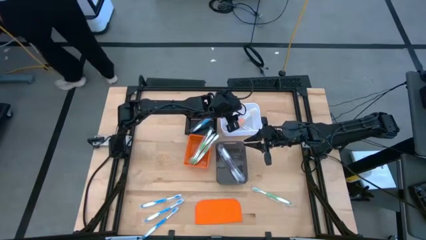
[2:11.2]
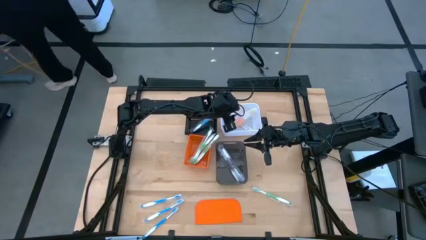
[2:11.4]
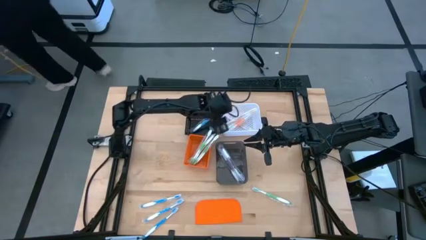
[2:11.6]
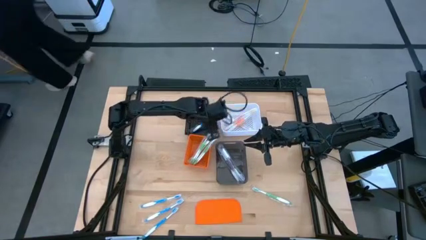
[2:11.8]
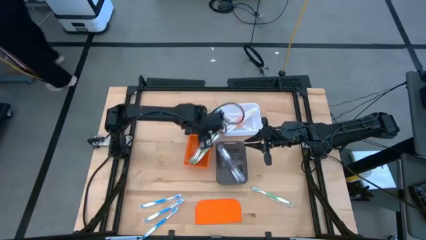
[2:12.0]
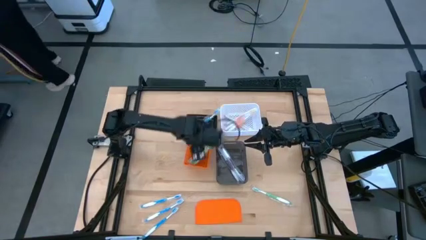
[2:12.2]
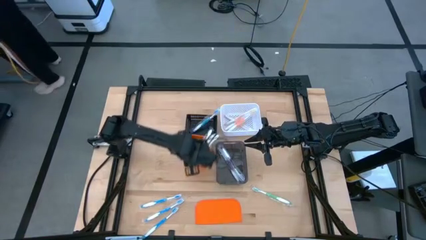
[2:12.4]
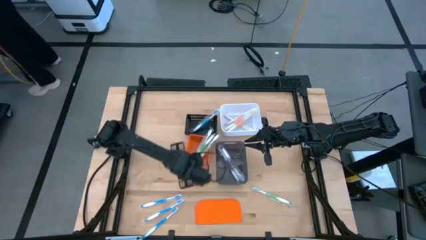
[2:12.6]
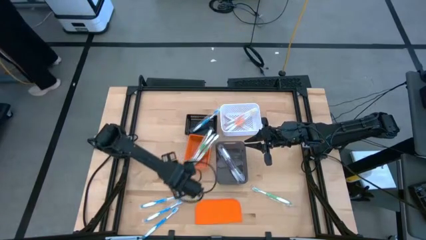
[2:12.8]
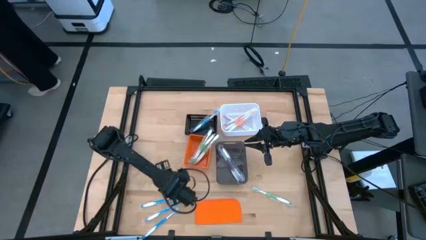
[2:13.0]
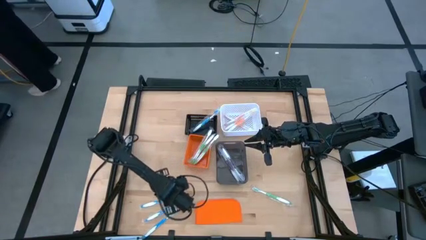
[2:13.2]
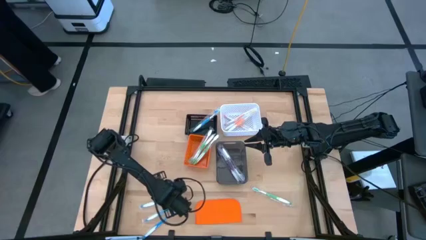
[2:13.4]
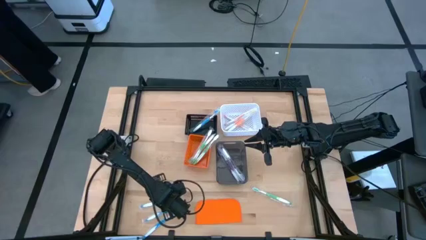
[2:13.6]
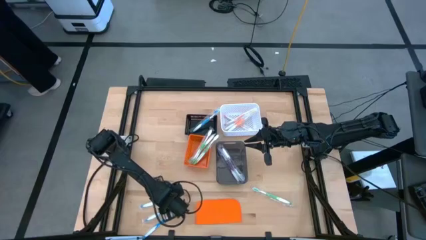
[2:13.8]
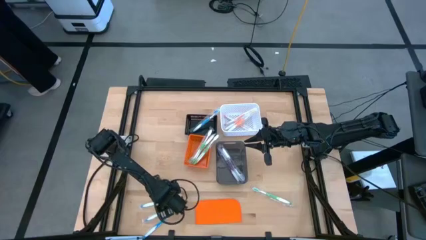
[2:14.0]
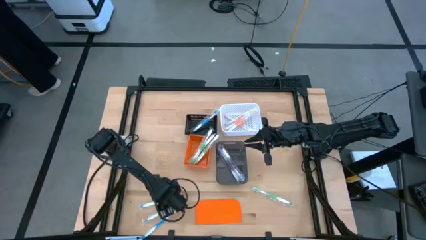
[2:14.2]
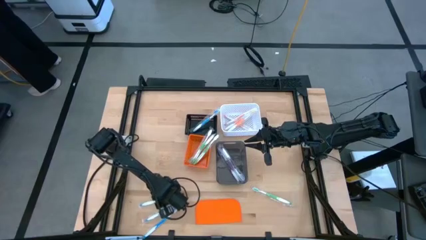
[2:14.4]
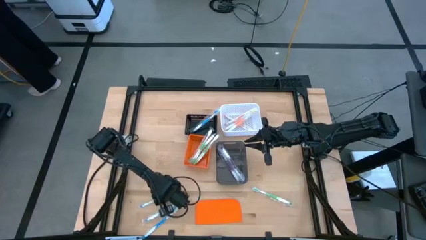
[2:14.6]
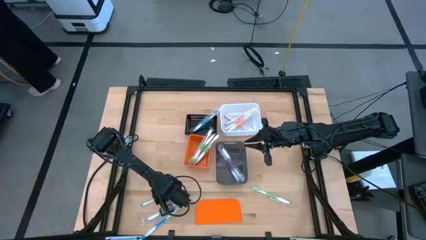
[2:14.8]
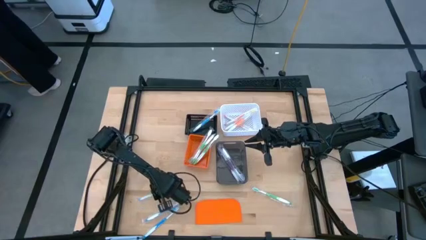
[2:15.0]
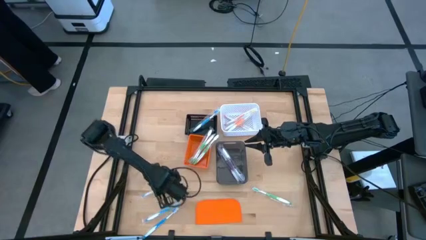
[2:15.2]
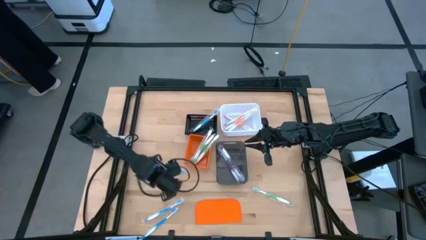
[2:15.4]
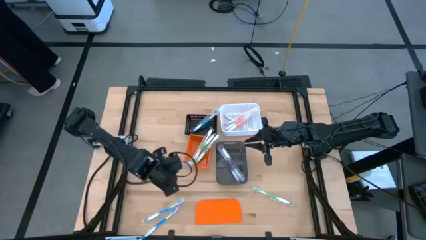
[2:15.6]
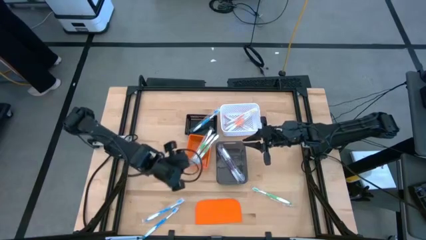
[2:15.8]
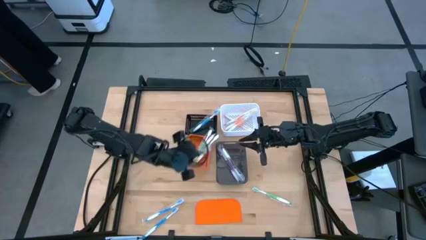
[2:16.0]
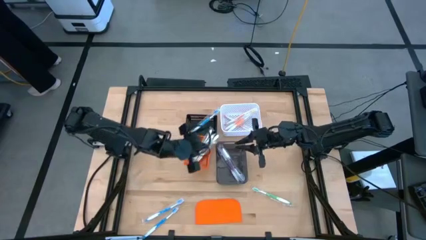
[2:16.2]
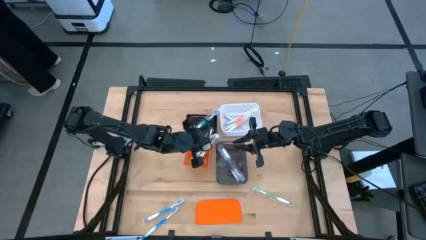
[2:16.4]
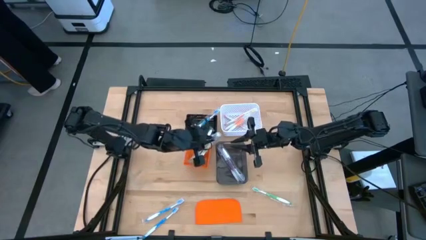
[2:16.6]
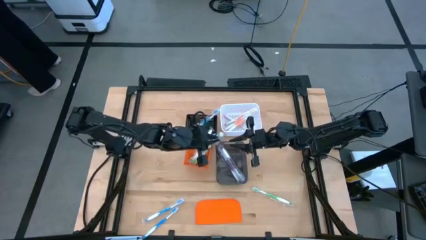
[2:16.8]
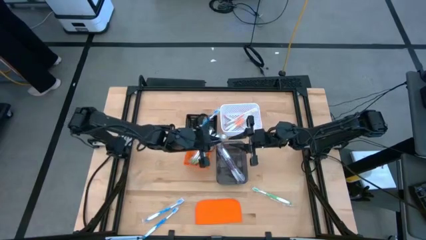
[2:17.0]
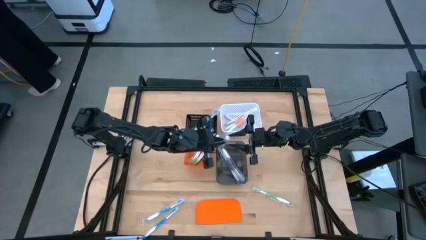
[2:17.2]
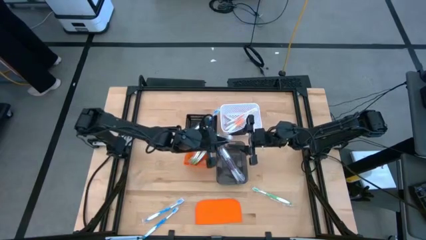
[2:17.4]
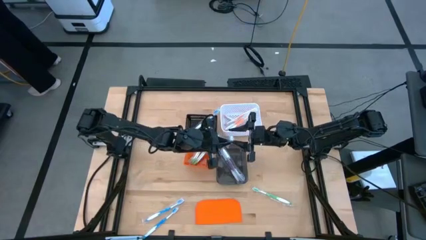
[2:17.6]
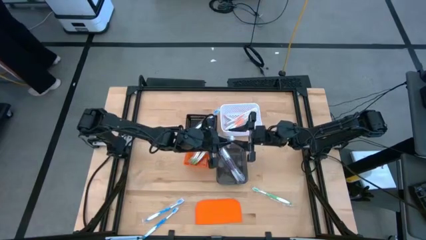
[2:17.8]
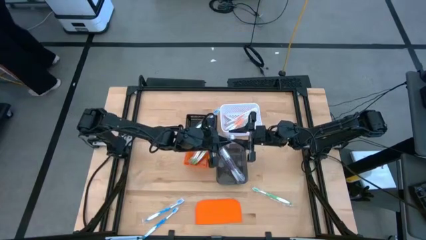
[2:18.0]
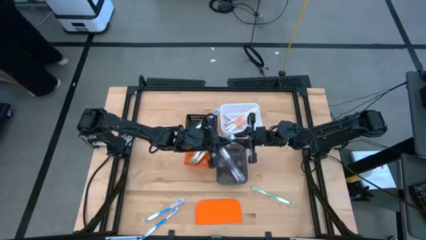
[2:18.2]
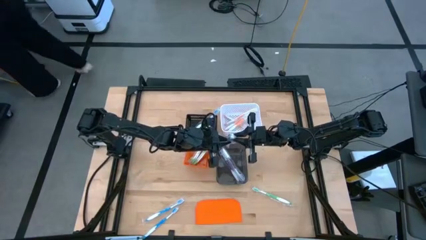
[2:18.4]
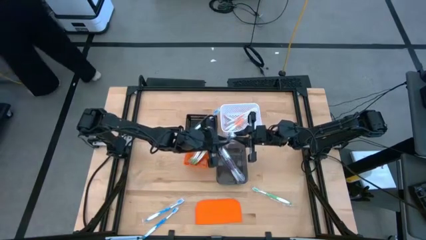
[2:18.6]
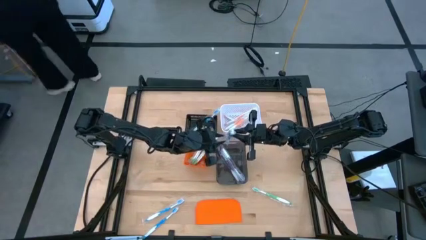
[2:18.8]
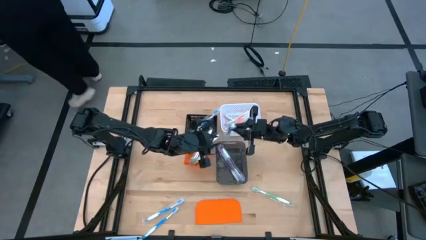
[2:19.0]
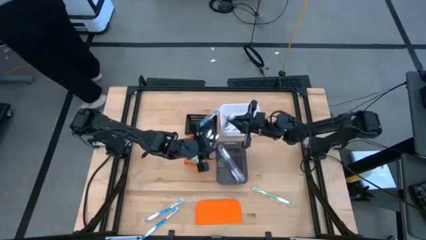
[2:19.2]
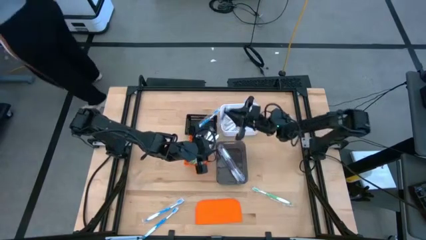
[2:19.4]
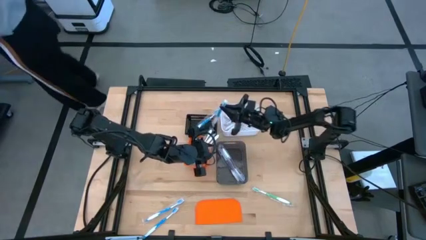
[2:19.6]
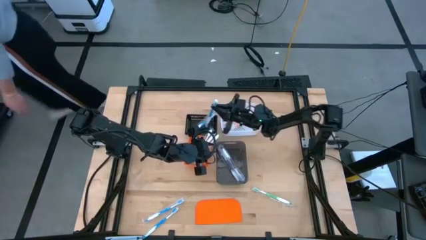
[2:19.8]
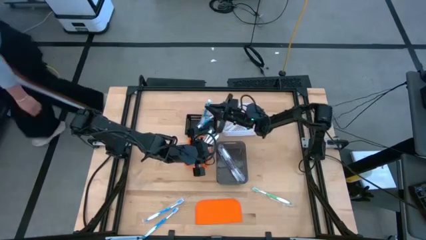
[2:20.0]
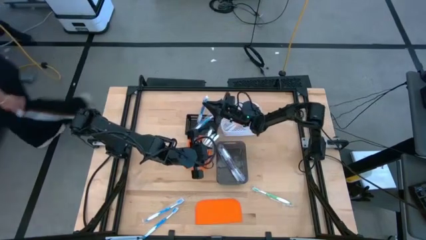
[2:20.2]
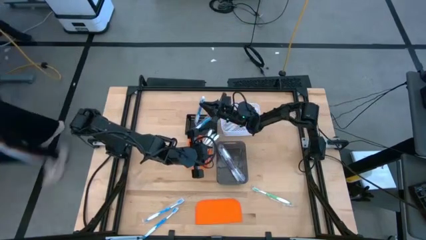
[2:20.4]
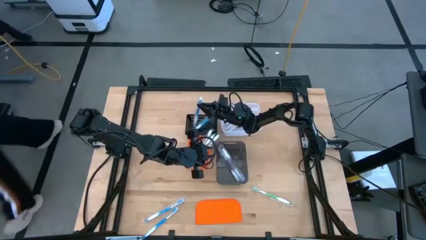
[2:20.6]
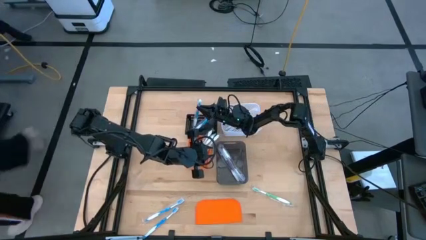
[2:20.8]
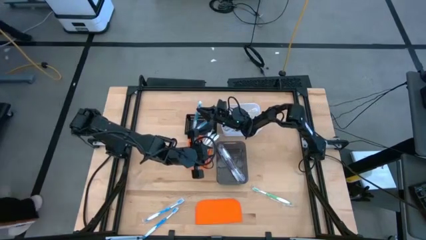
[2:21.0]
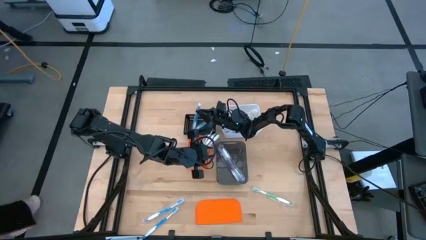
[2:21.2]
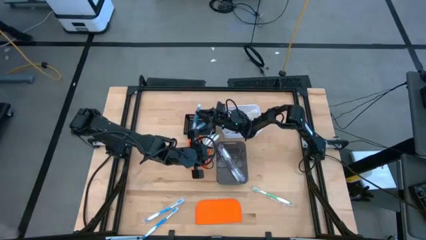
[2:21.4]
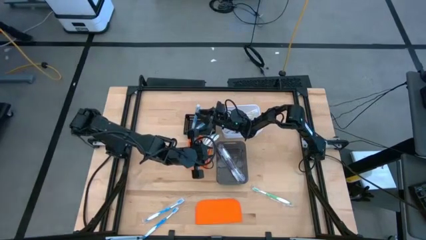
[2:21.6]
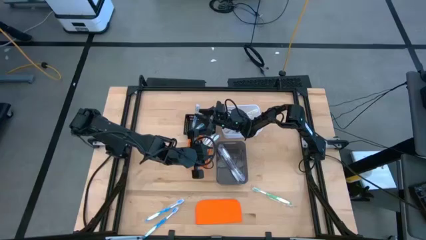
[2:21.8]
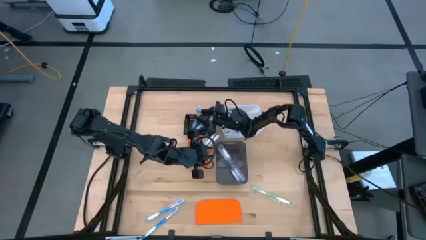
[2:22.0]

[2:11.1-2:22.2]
Task: Pick & Place Toothbrushes
Put the blue toothbrush into the black bin

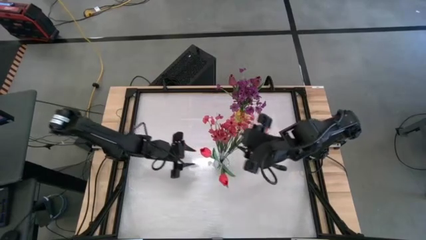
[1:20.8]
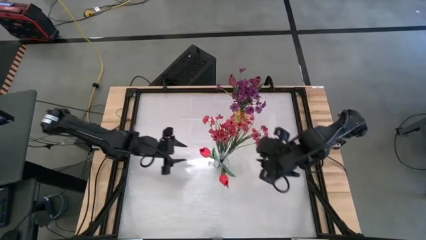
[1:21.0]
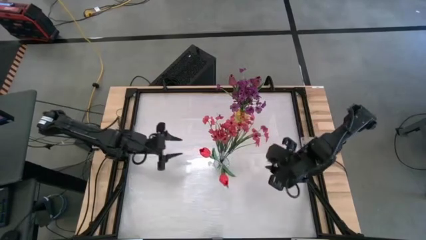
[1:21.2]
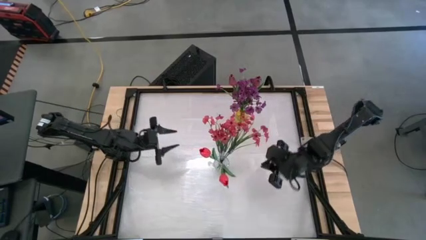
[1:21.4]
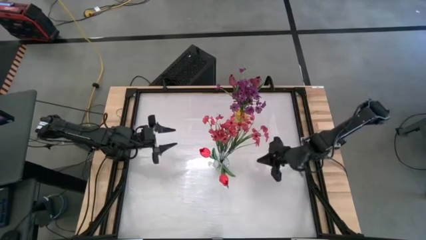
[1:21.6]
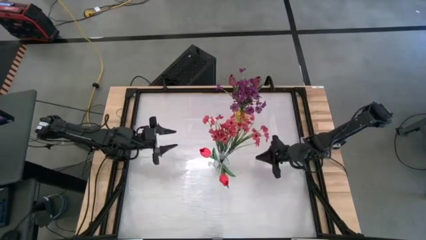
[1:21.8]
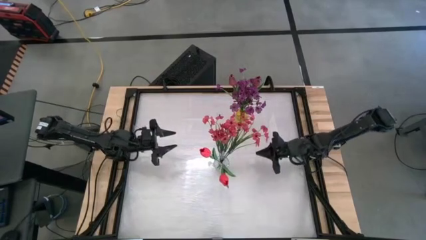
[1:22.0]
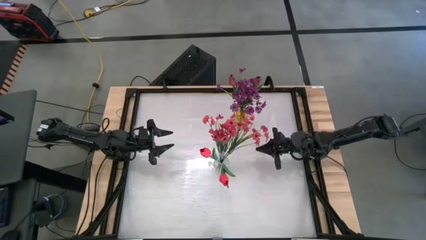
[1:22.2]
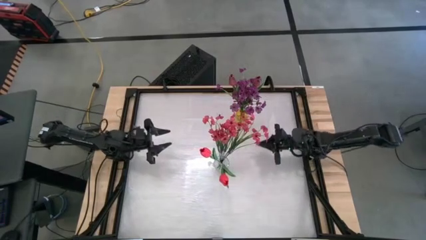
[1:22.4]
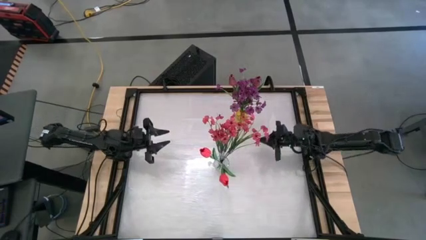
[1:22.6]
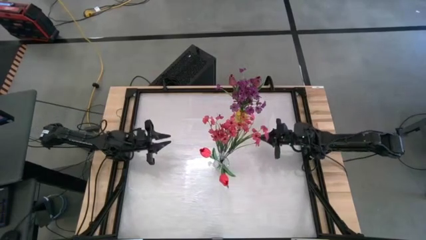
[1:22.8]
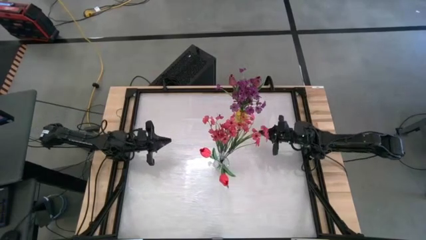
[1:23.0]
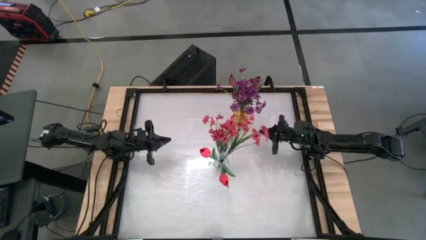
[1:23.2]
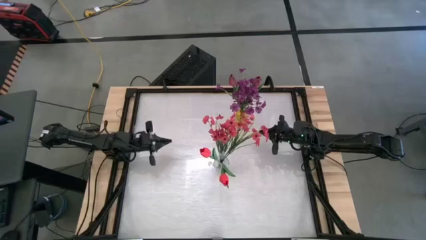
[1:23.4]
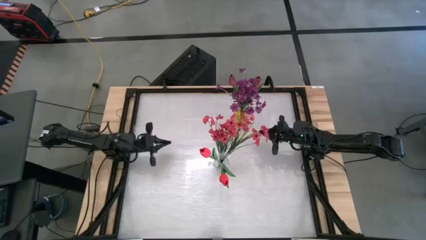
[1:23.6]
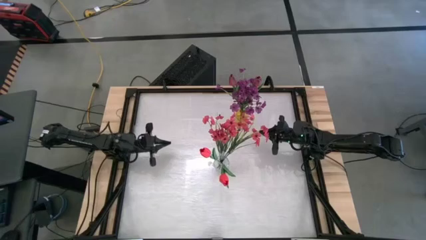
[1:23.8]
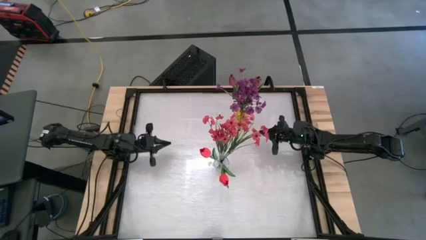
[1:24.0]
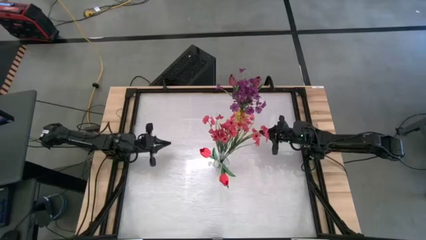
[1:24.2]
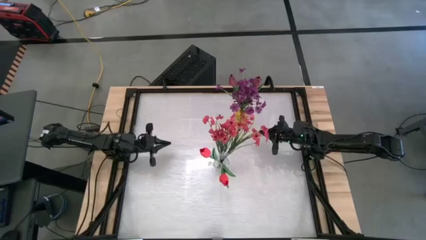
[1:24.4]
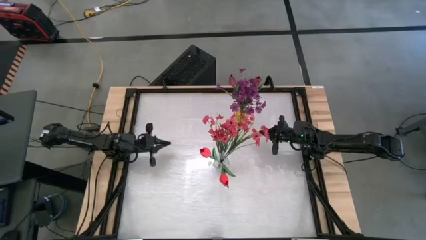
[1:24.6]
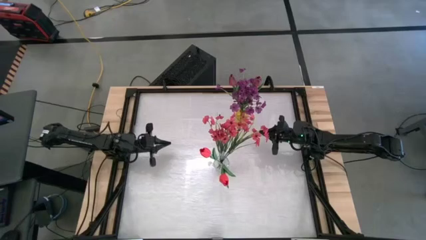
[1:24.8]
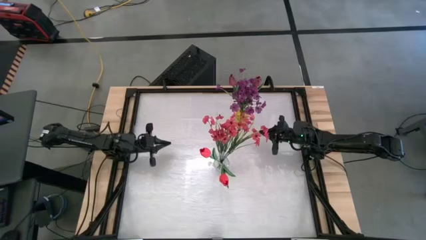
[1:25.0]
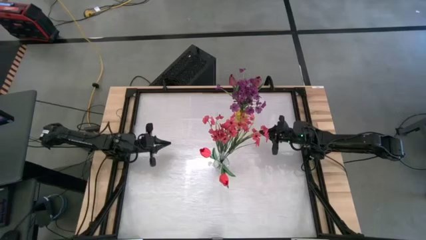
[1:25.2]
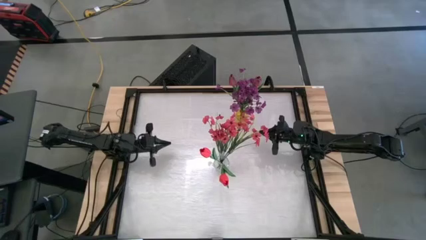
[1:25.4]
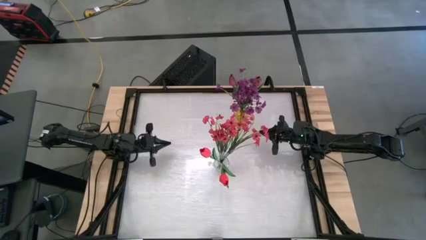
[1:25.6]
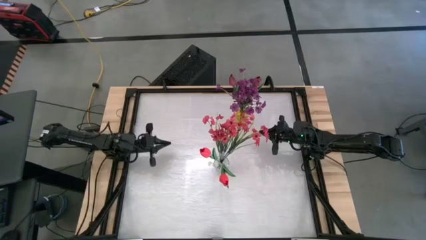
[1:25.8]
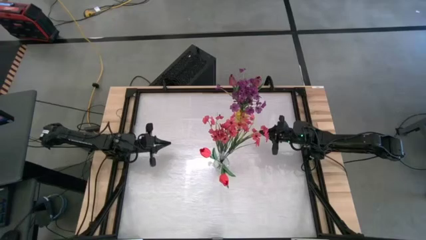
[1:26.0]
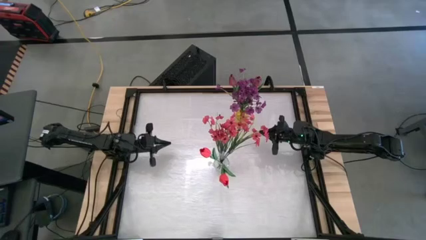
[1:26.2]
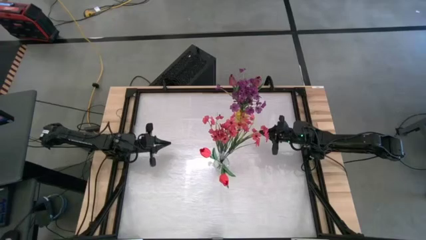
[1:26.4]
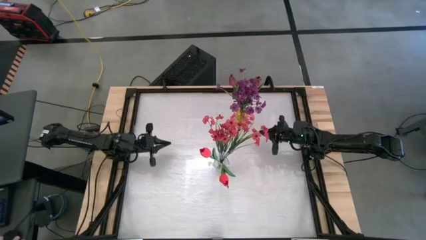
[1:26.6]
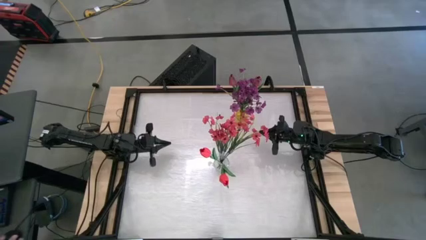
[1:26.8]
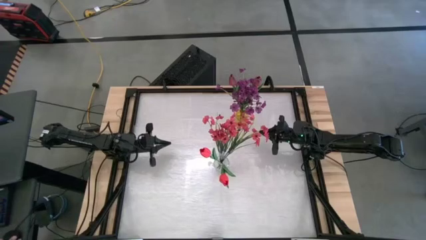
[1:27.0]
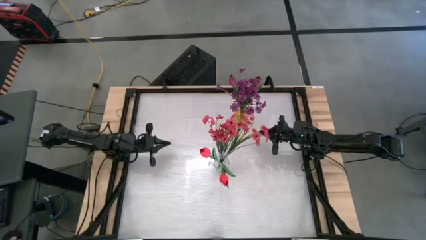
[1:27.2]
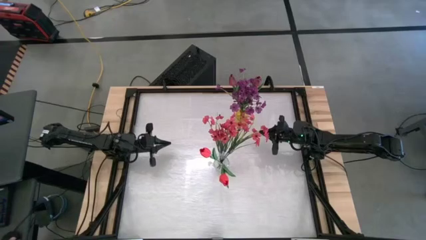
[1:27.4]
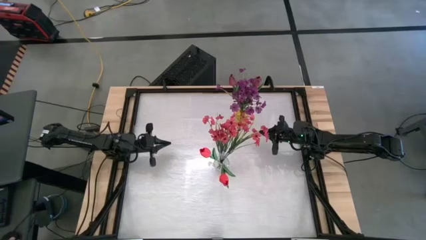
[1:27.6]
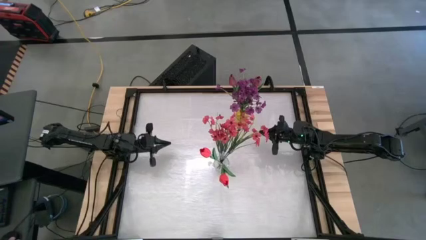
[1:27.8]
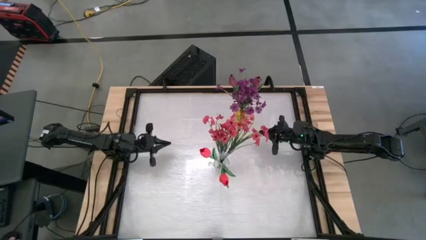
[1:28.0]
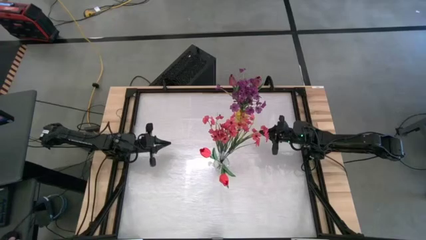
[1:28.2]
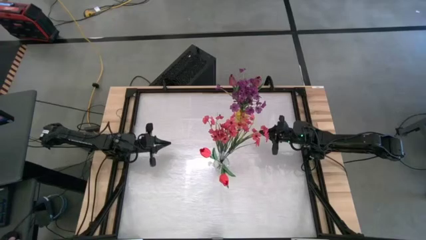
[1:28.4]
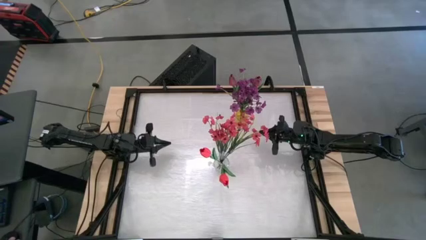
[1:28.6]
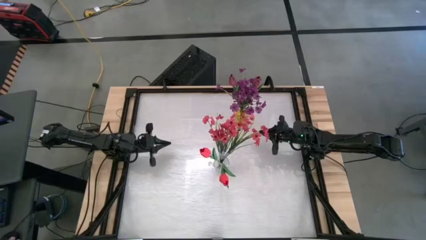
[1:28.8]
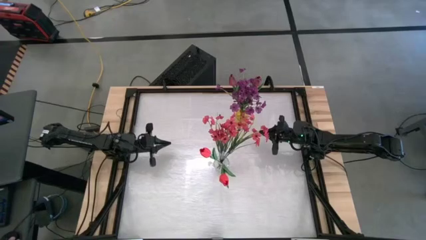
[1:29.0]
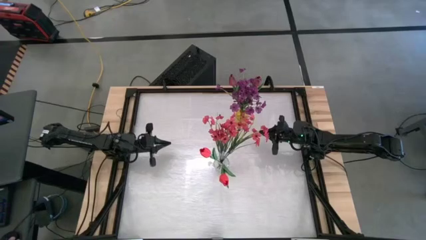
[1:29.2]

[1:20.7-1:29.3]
Task: Sort flowers into vase by color
Return to Home Position
